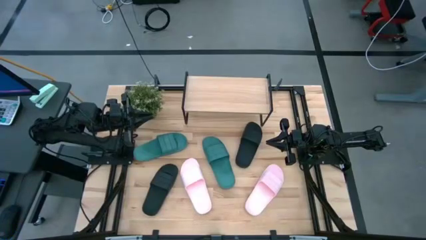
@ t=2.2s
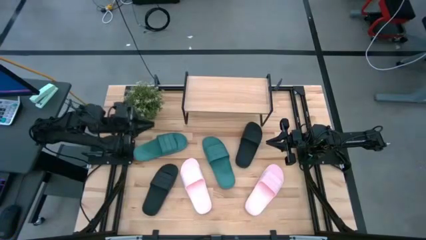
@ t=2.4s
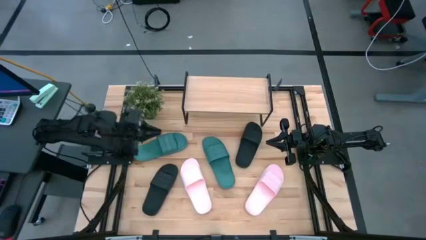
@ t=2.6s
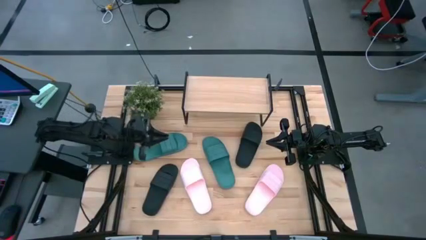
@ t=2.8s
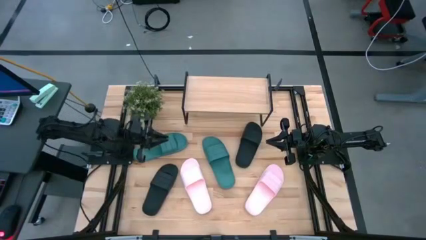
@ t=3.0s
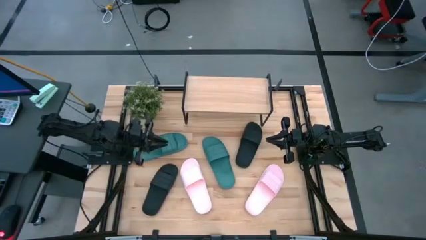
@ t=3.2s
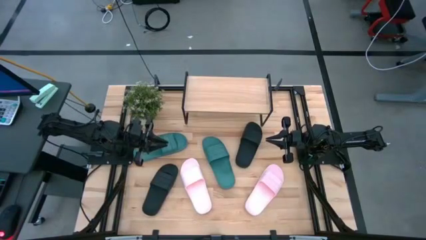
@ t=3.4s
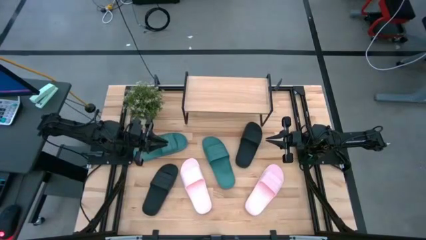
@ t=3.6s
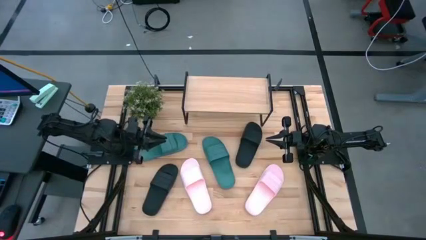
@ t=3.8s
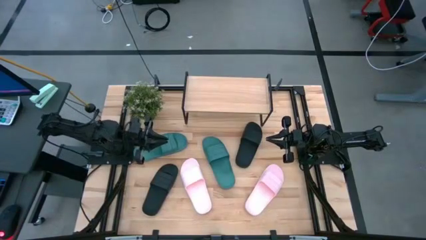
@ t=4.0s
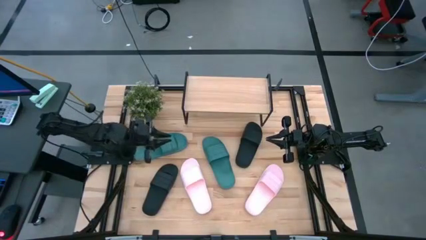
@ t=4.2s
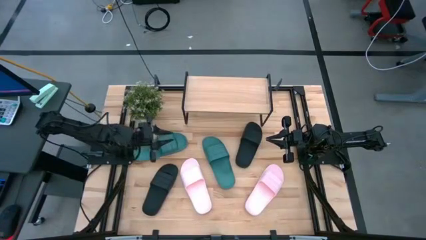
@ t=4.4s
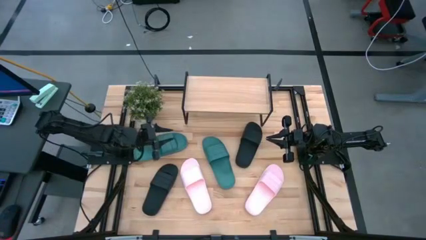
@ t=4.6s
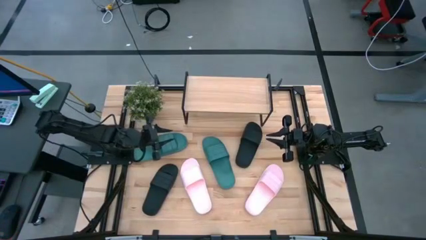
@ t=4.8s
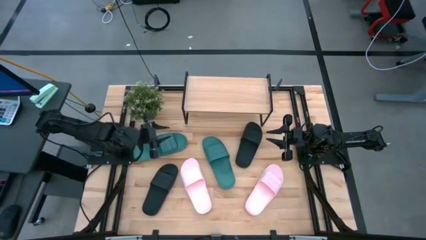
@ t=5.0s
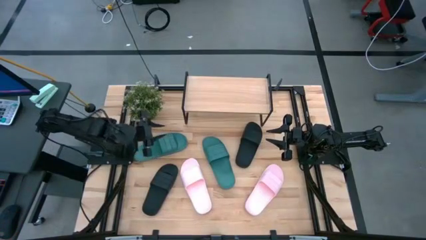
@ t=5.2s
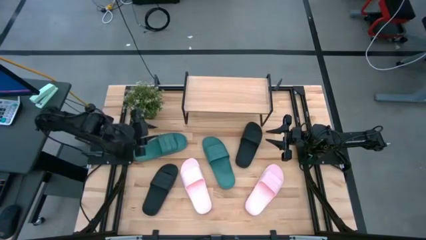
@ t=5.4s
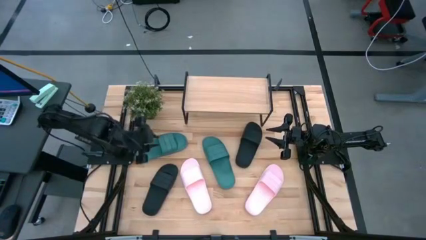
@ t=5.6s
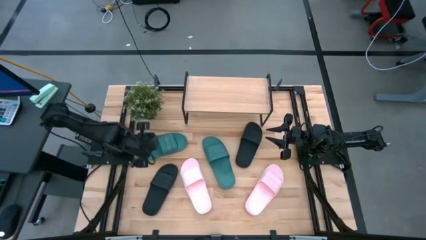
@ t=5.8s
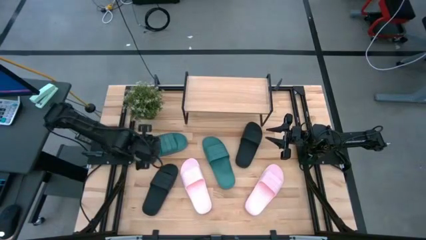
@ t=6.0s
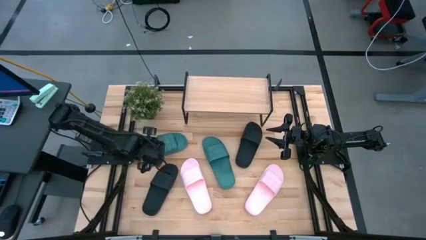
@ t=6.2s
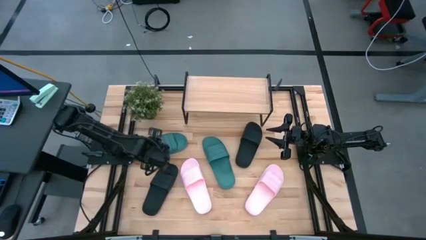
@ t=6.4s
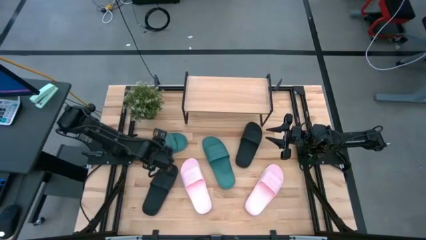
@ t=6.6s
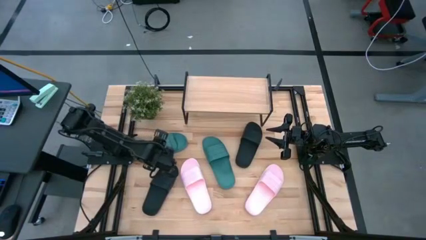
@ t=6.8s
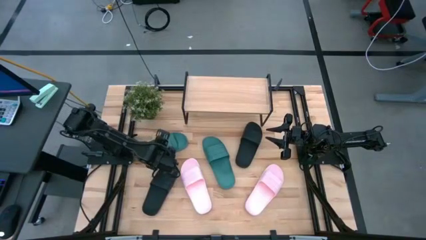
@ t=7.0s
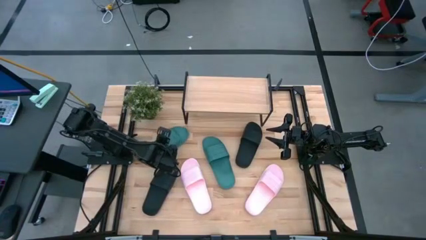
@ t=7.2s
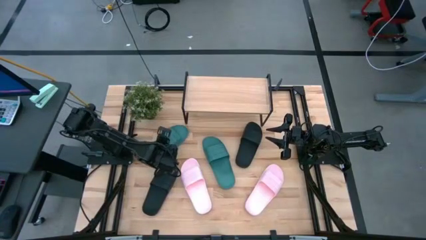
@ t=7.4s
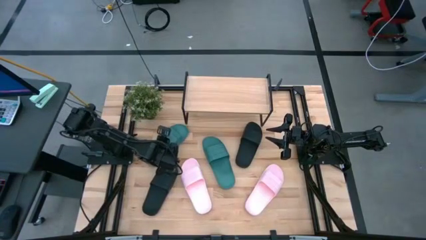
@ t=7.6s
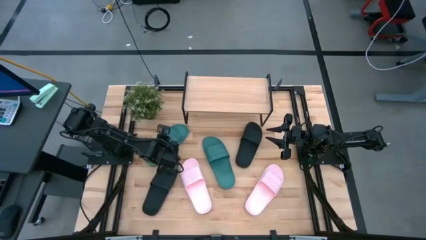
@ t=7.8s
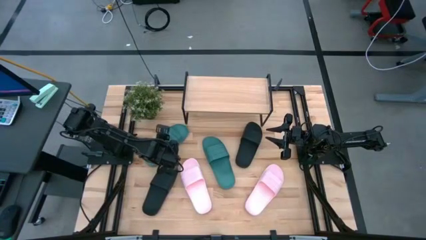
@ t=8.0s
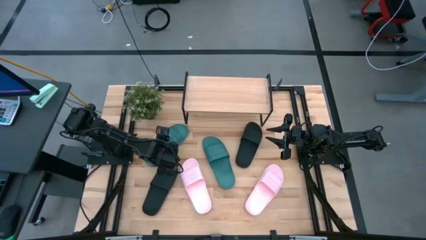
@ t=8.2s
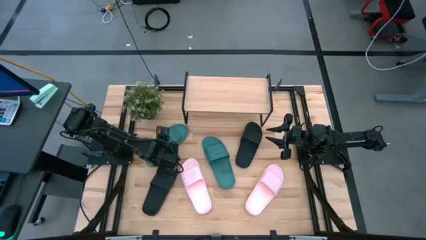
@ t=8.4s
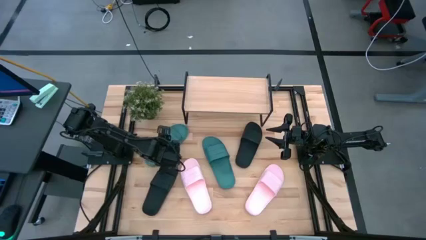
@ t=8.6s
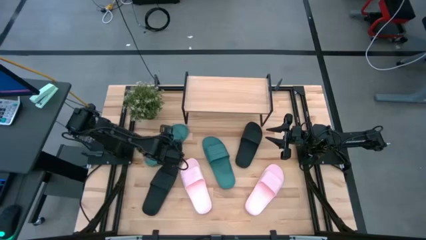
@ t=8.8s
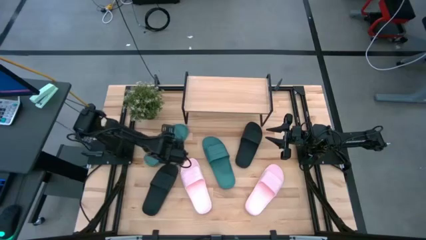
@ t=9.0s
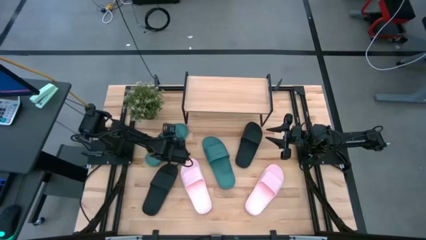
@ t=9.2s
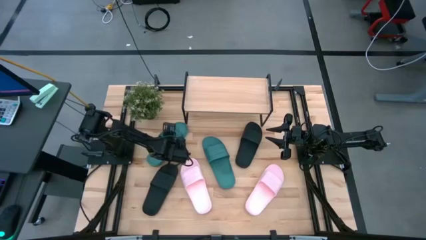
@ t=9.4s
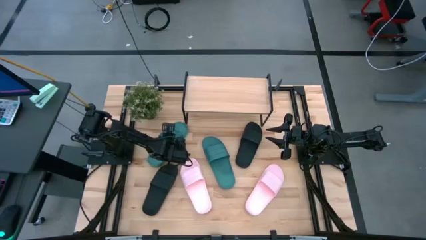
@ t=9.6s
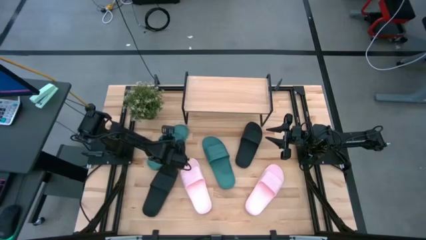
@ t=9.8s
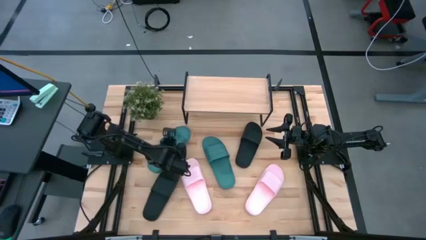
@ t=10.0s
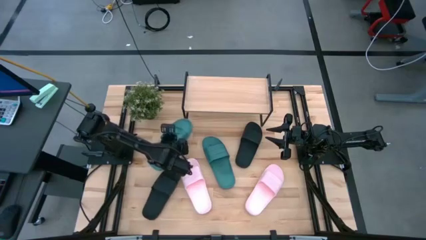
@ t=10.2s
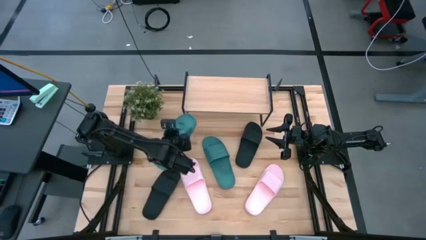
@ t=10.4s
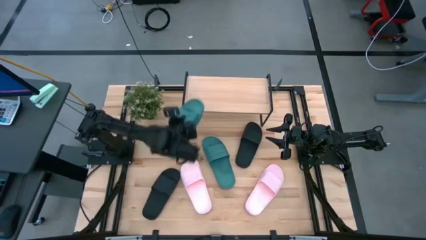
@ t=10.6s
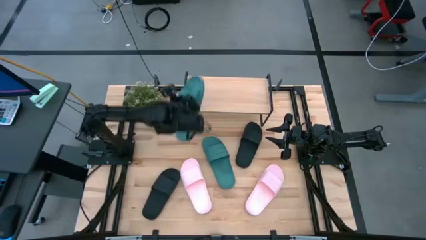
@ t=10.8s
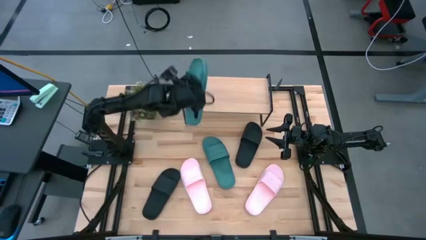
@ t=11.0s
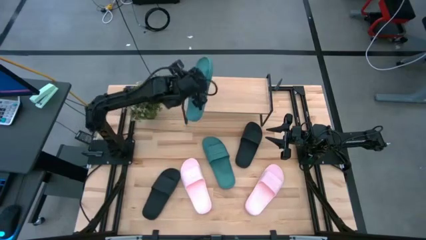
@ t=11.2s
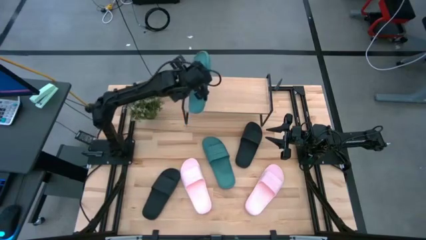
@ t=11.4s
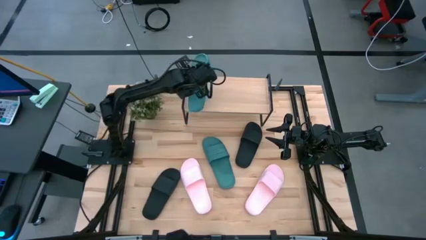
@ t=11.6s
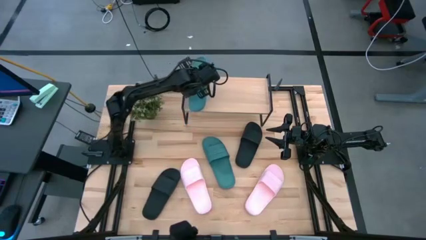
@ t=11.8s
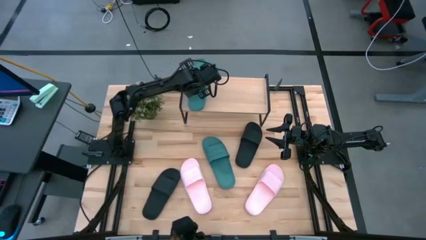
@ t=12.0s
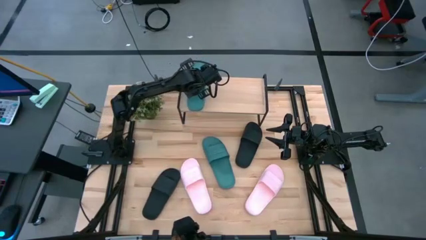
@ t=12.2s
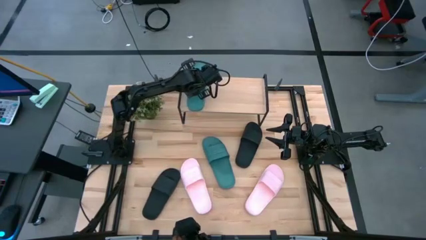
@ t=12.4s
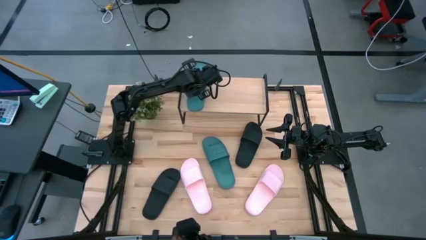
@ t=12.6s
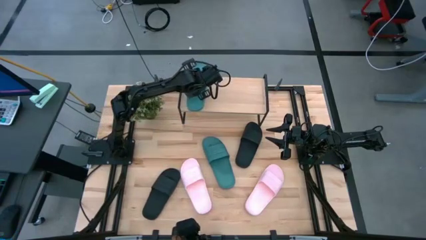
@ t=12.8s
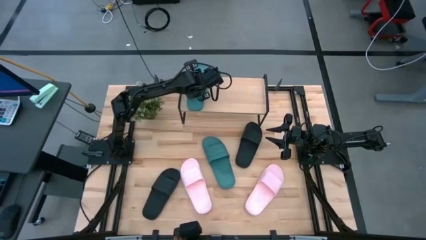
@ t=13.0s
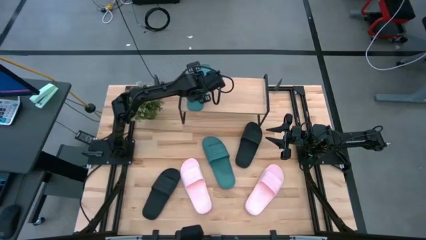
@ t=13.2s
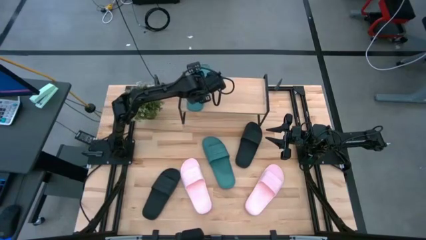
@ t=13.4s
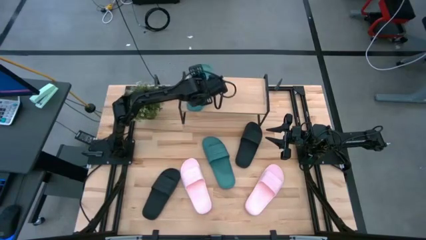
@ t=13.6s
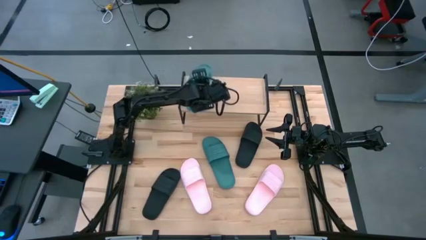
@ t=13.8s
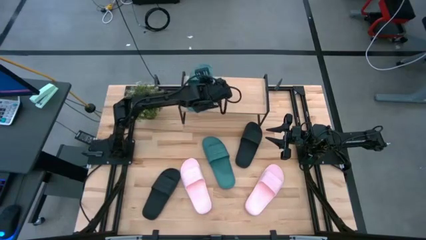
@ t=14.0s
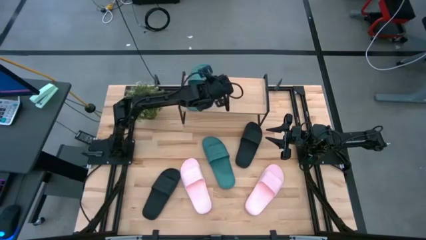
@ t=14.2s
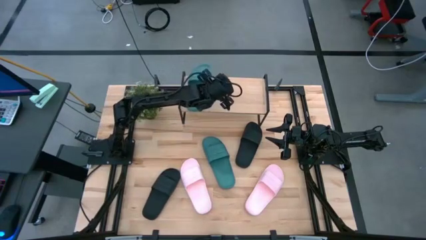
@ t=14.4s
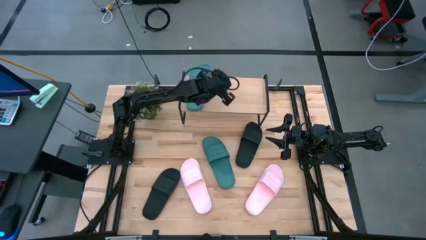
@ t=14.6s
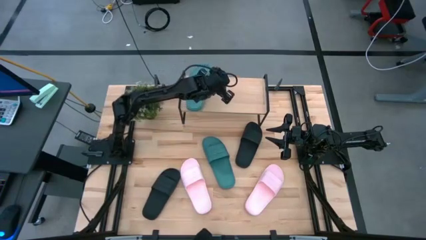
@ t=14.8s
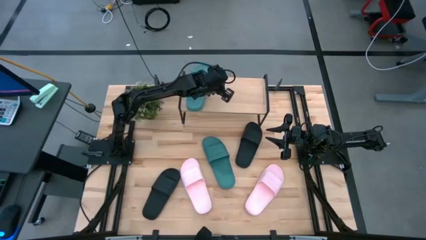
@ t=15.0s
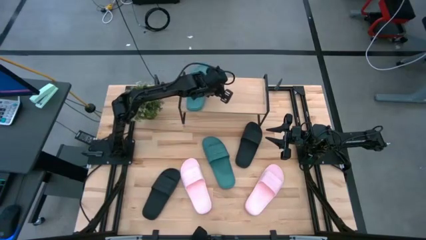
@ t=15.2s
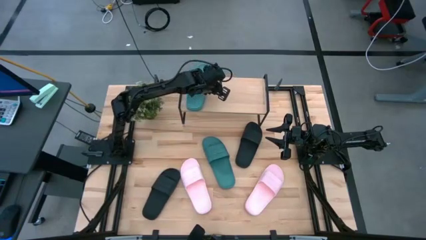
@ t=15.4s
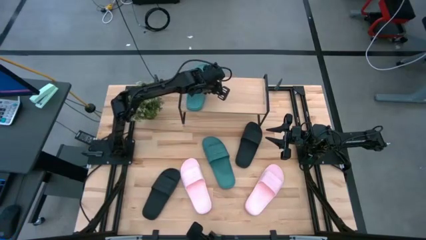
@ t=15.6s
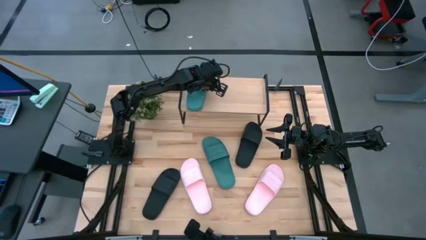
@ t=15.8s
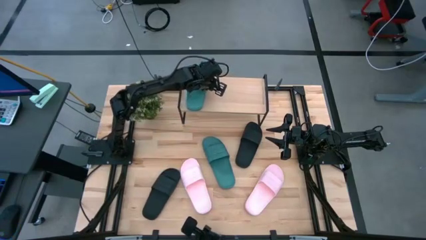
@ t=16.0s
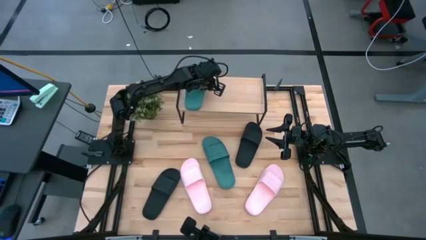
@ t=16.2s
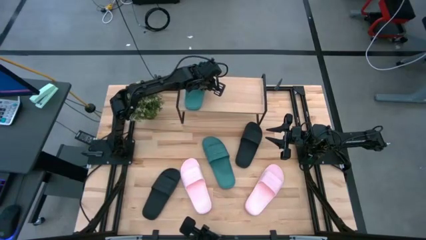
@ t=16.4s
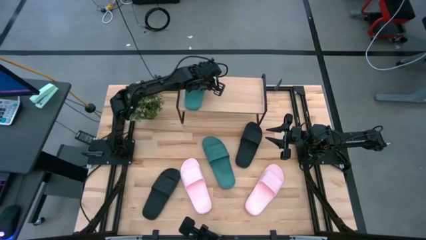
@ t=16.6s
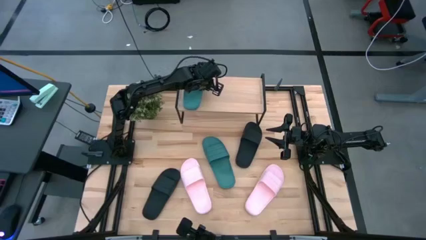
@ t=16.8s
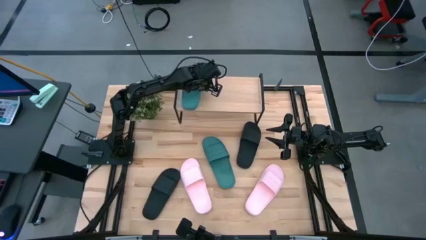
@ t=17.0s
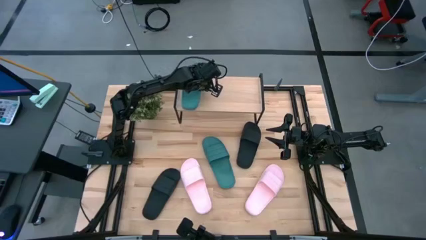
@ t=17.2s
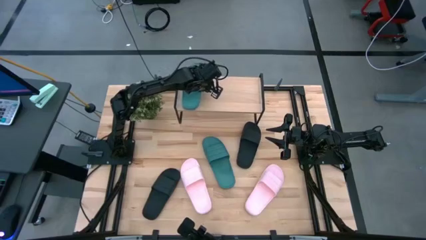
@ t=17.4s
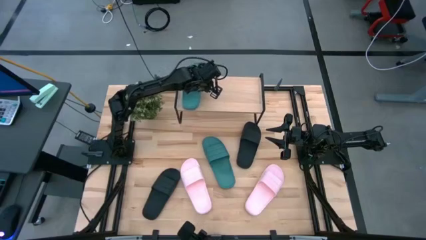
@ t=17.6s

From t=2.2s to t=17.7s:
Task: Pick and place slides into the shelf
Put the left green slide on the shelf
